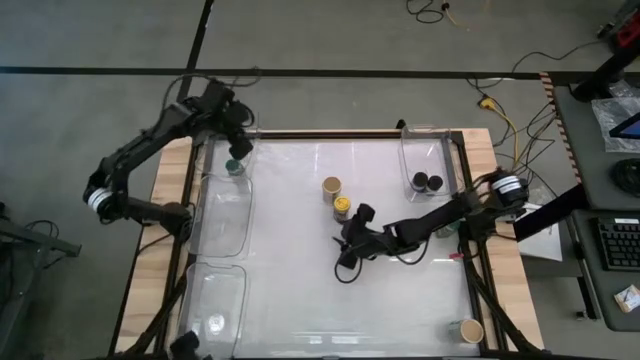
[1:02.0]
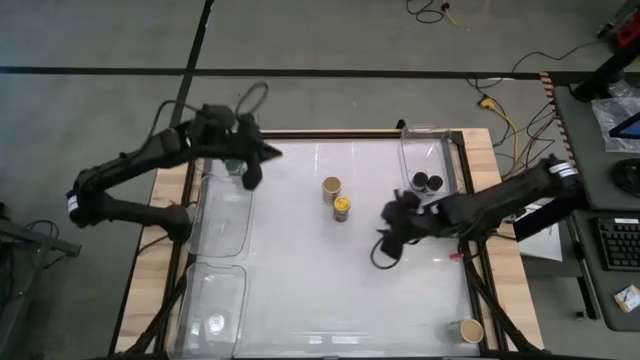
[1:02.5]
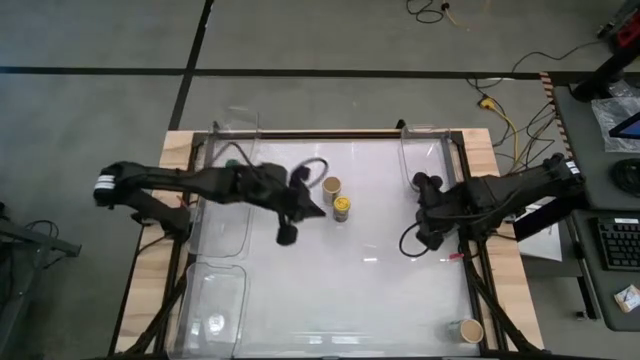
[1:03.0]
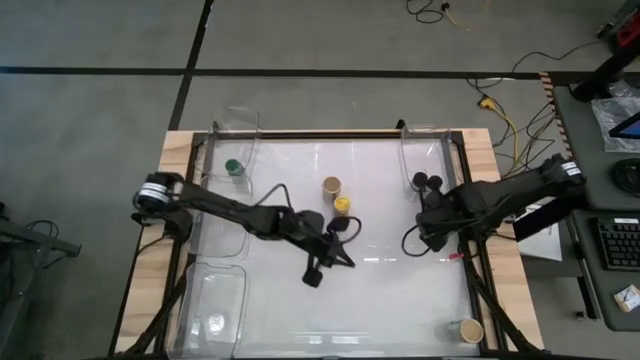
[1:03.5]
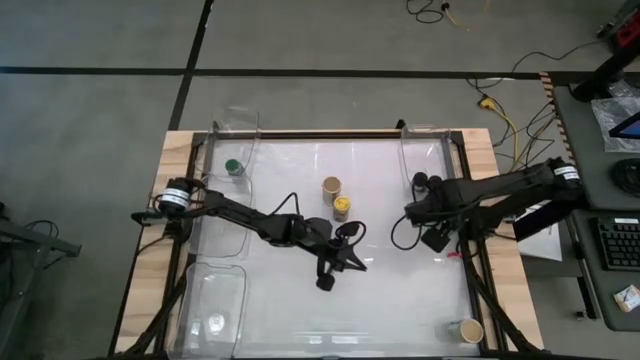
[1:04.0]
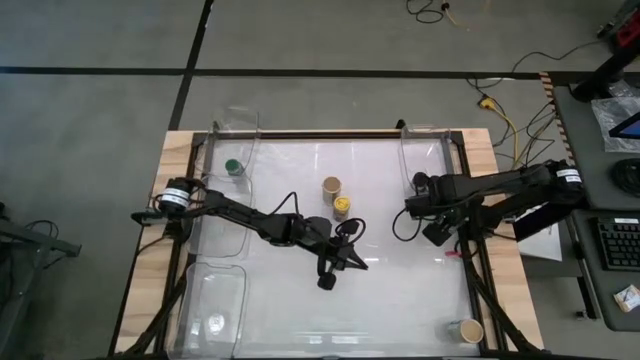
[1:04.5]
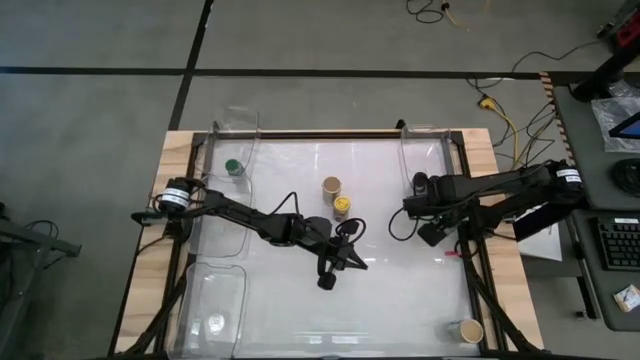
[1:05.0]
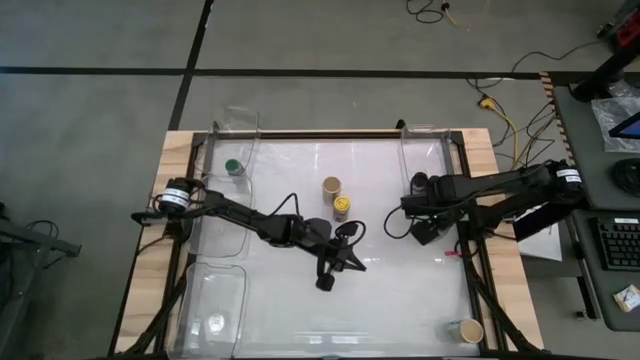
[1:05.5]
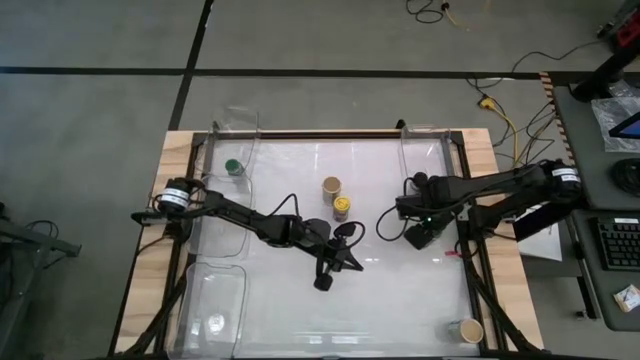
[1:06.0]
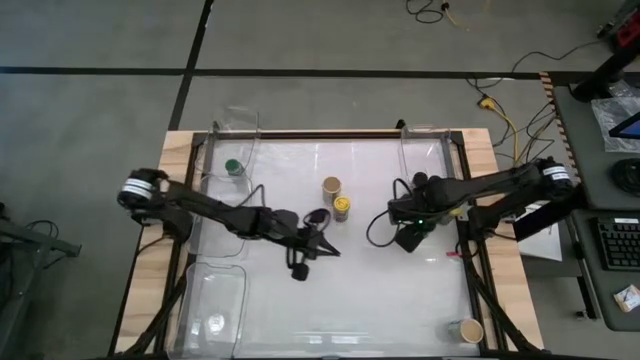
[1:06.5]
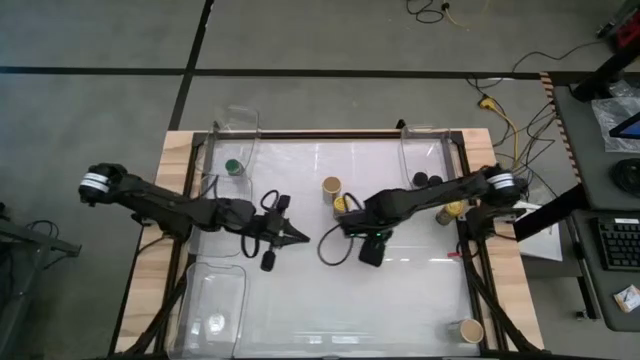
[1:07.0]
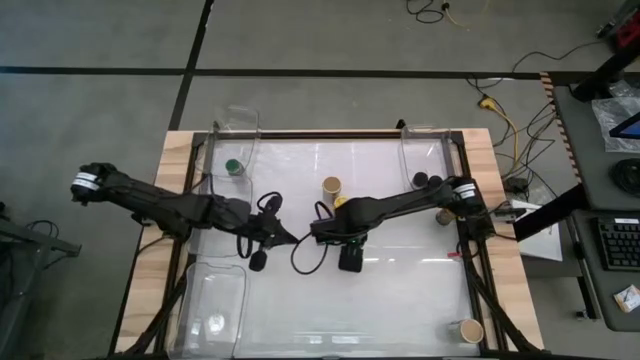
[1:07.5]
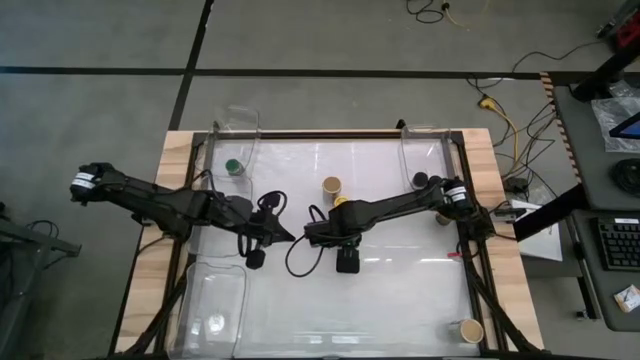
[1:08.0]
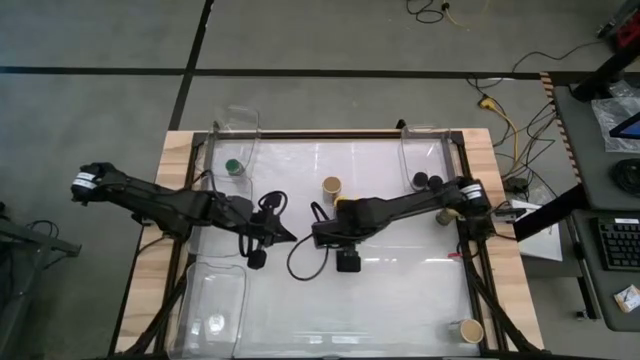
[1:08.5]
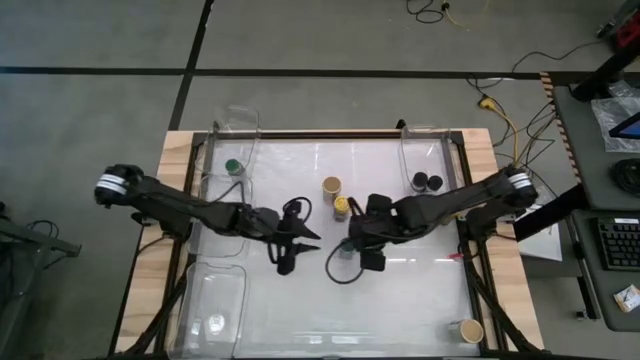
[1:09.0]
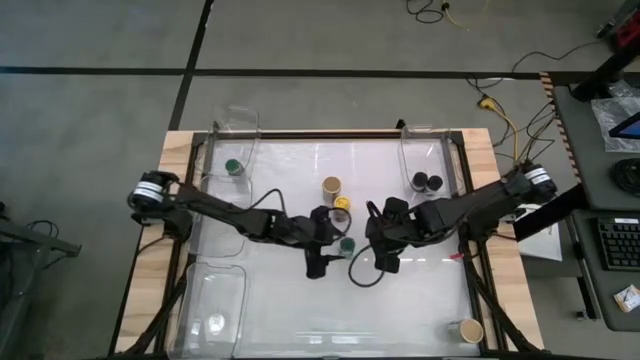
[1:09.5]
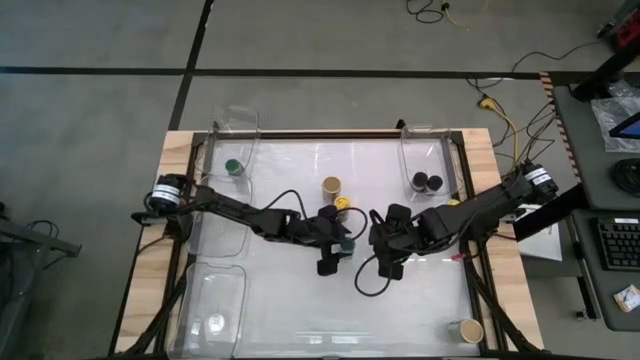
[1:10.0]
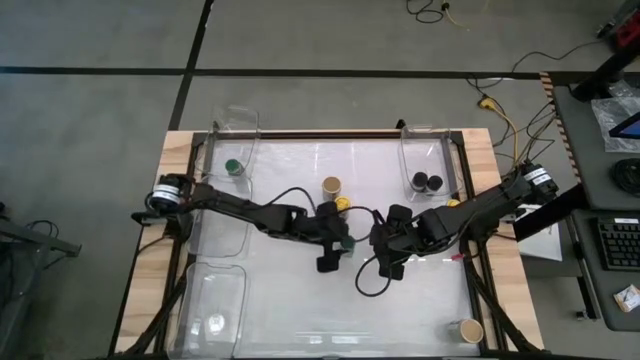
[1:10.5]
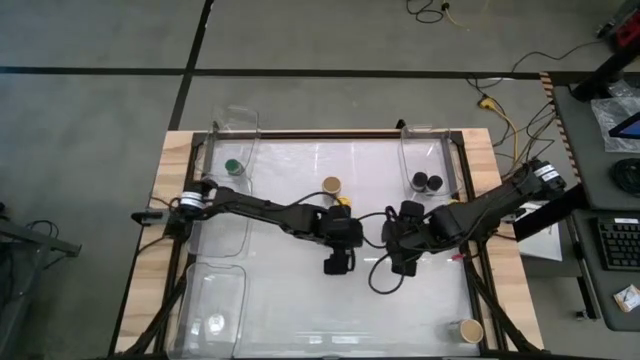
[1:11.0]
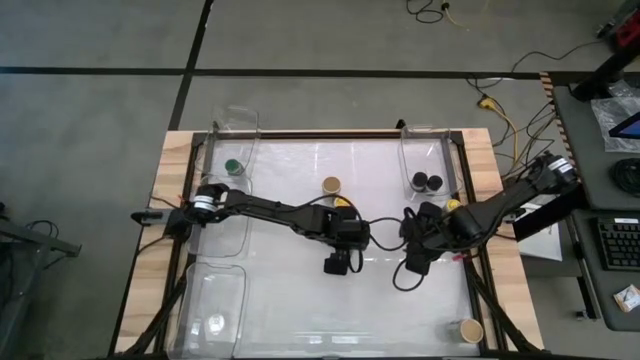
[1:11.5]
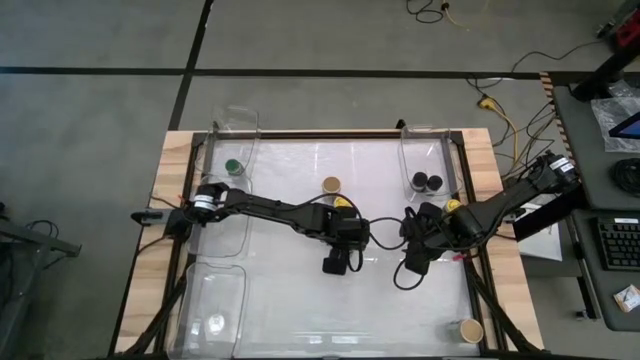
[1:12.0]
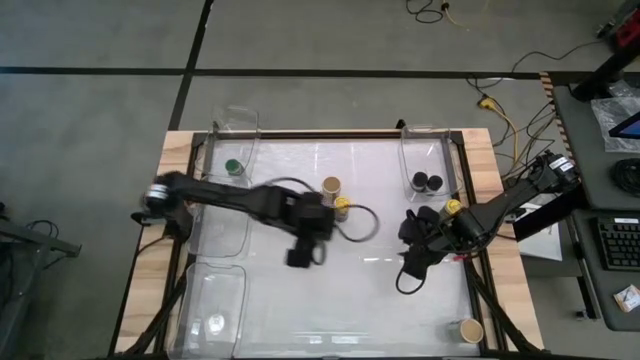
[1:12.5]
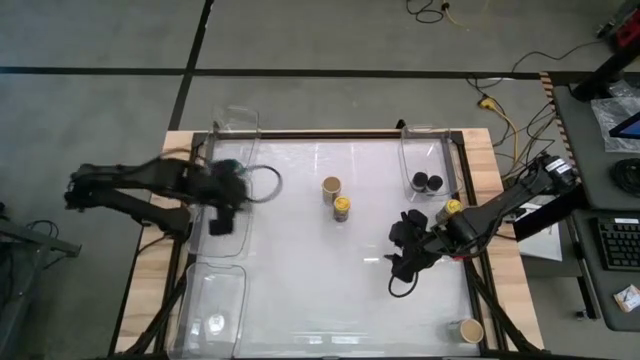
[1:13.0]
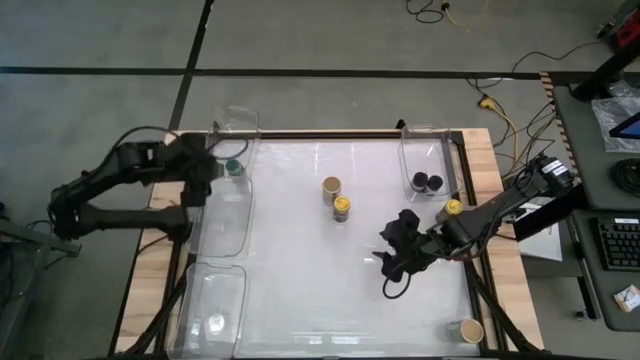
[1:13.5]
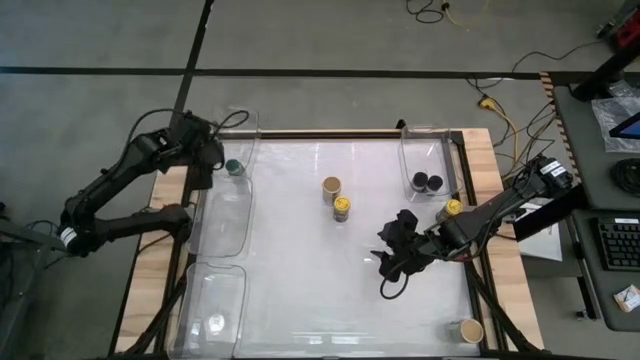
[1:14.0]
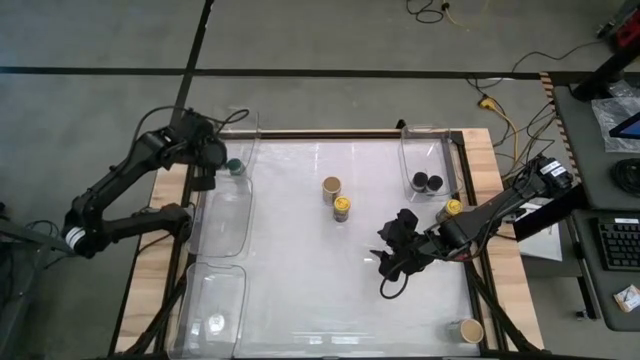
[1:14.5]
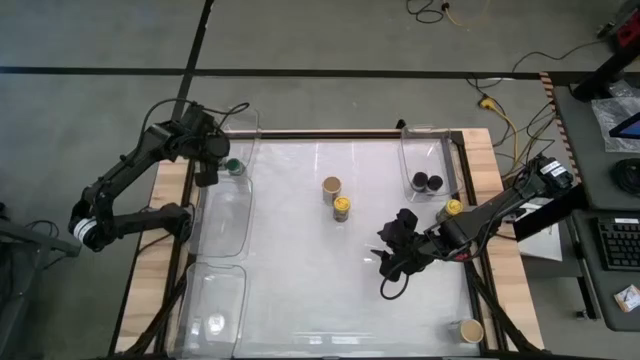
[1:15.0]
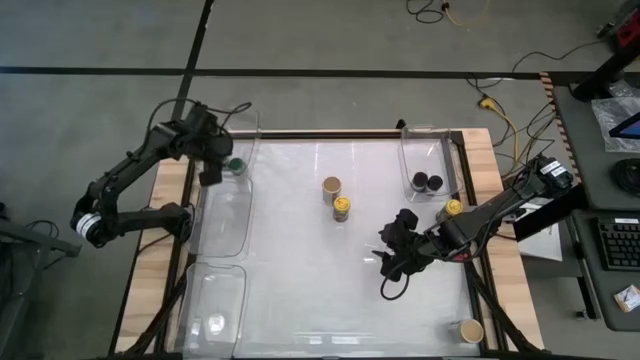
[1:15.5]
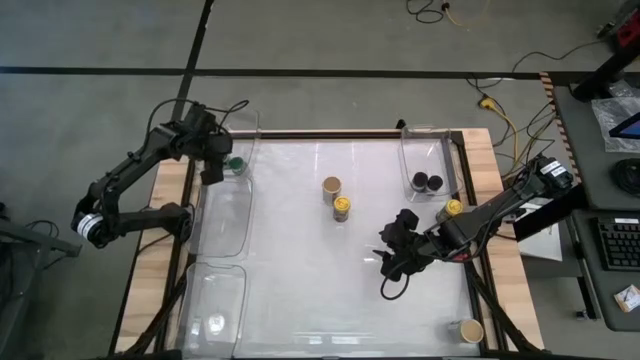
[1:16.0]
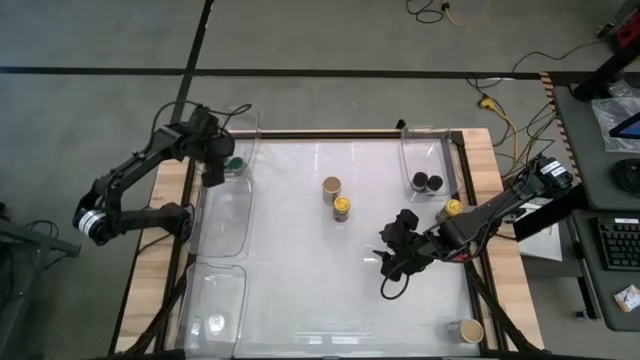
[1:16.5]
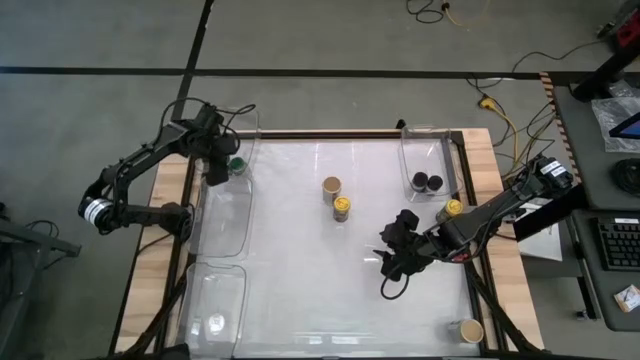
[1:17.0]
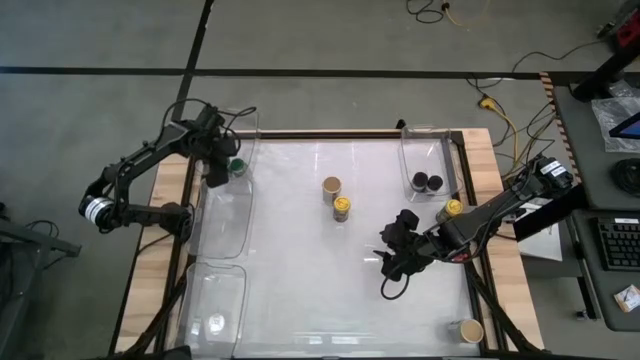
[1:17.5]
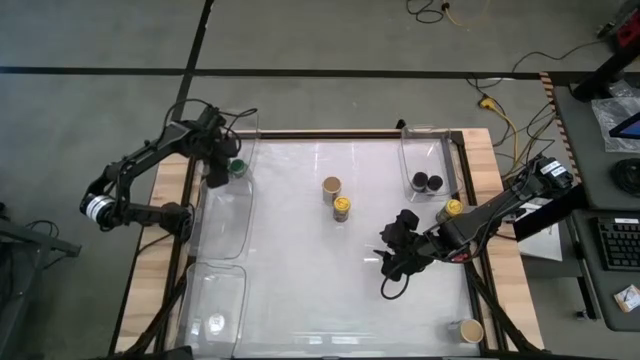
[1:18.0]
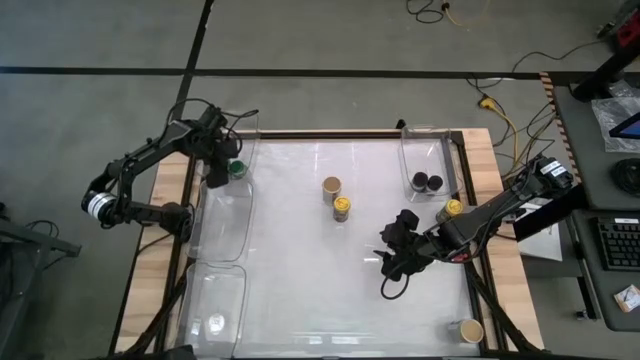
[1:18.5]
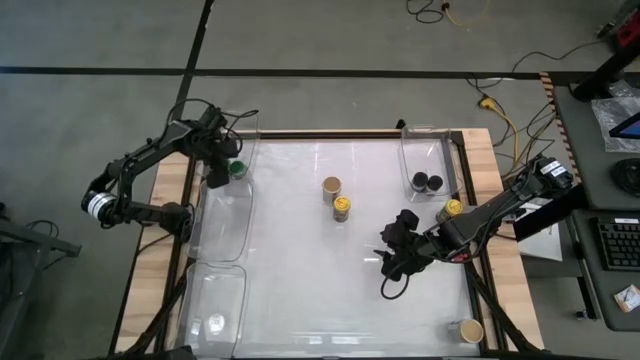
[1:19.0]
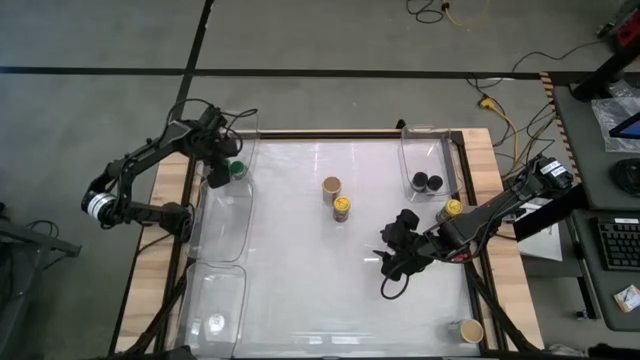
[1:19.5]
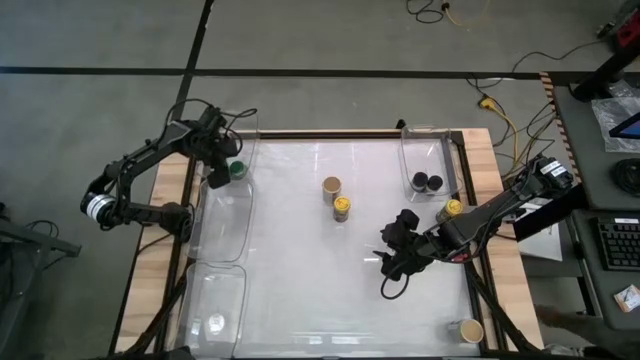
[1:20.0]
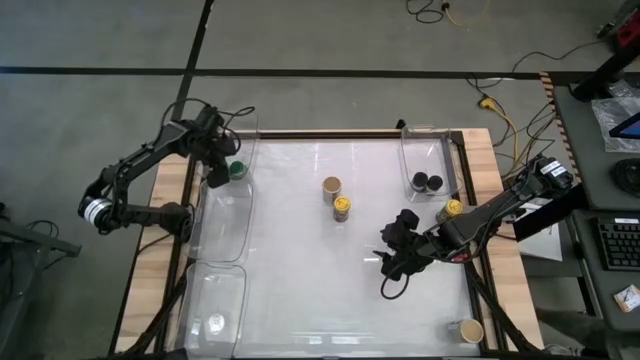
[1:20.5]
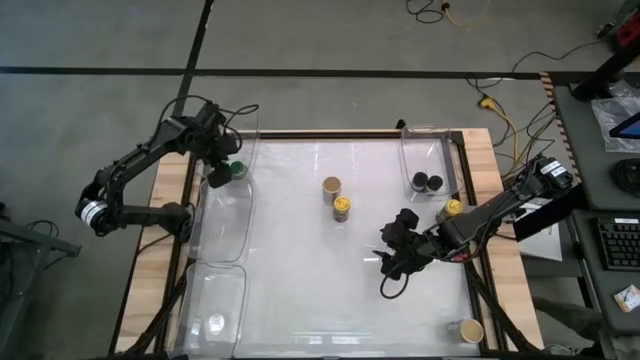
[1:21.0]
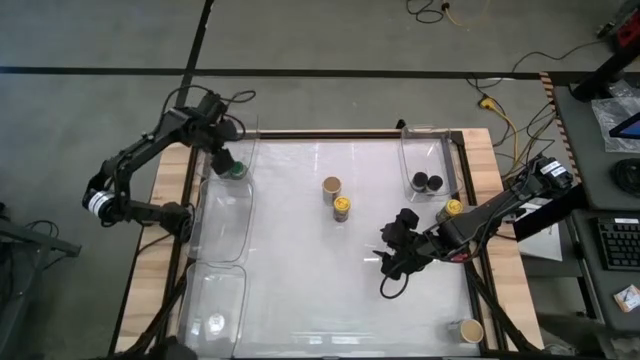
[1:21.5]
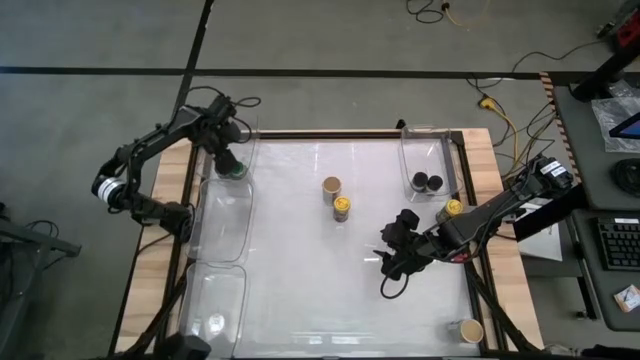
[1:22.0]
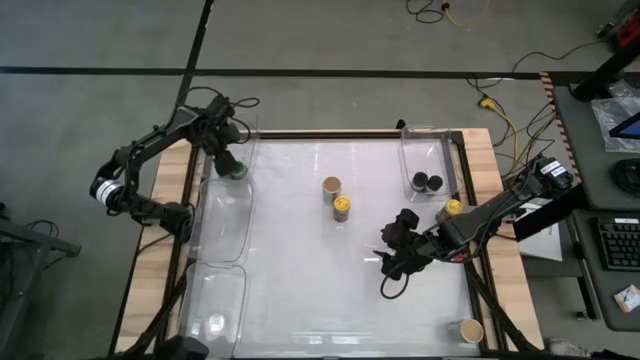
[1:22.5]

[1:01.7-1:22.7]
Task: Sort spices by type
Put the green spice bottle into the top left transparent bin

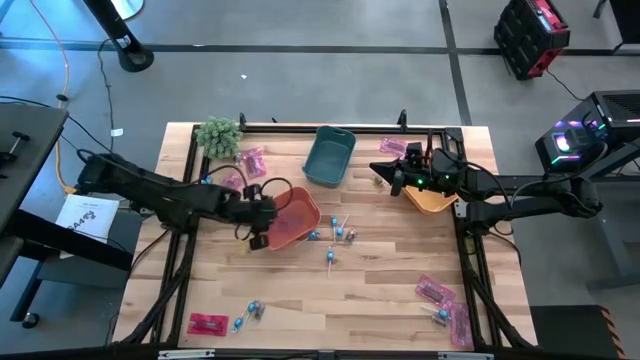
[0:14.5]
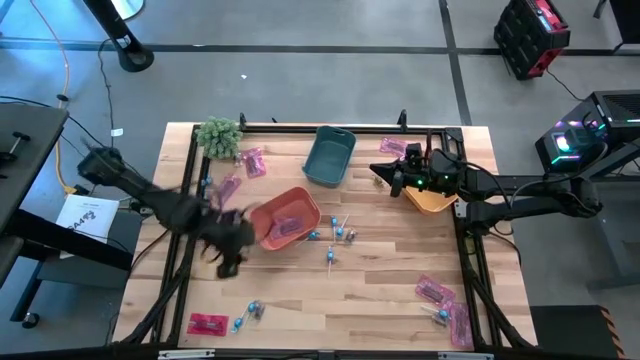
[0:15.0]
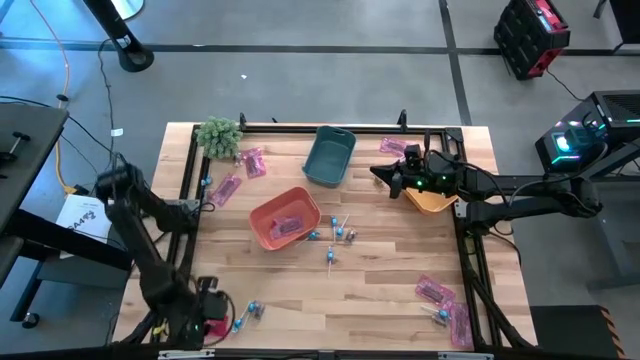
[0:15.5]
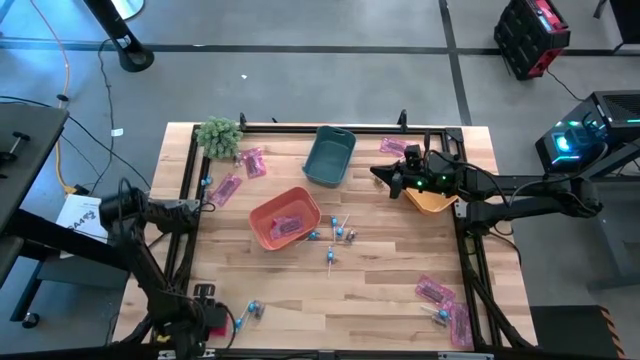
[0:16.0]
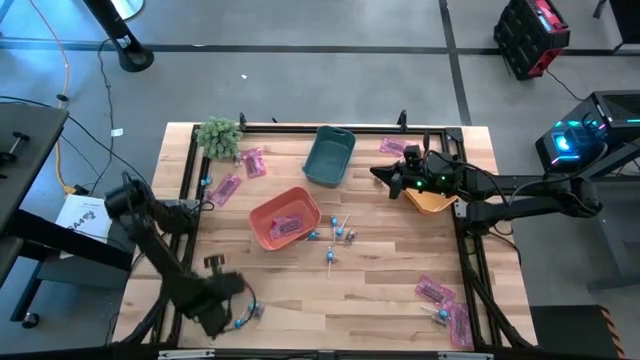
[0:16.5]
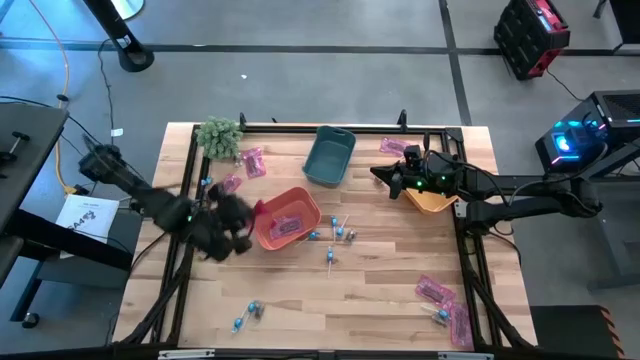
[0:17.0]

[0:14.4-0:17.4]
Task: Sort candy
Put the red candy into the orange bin
